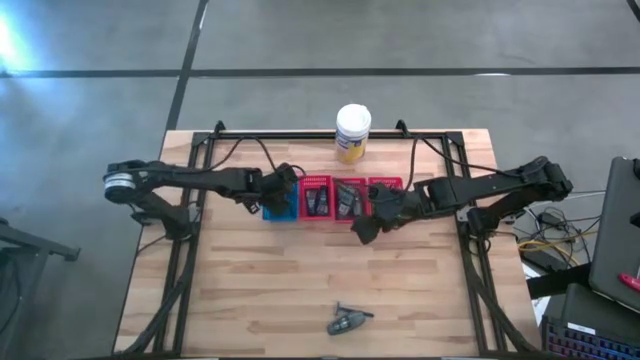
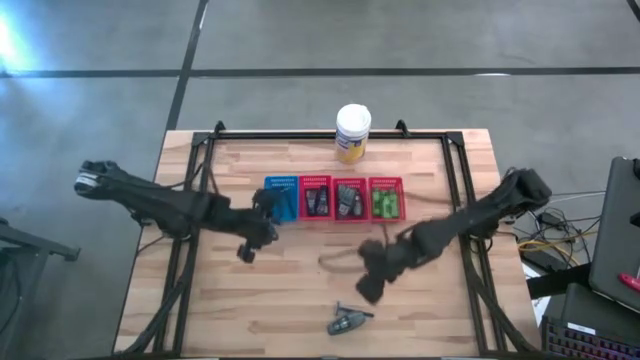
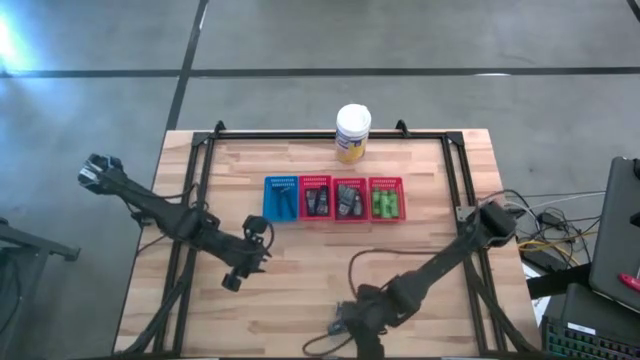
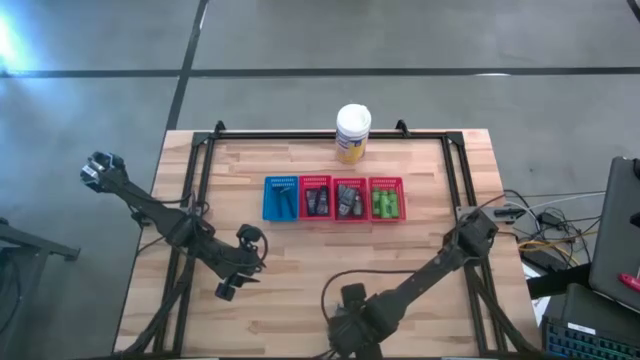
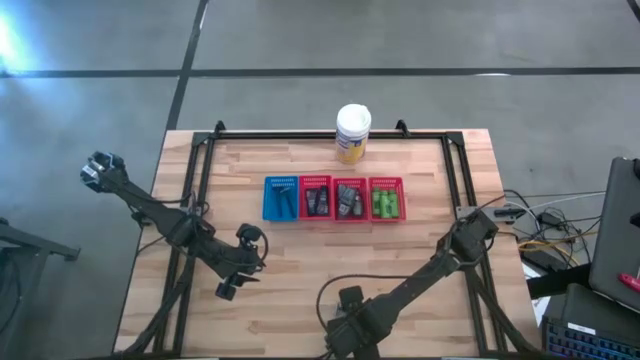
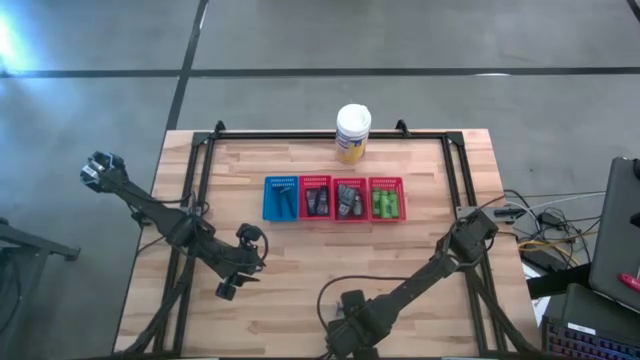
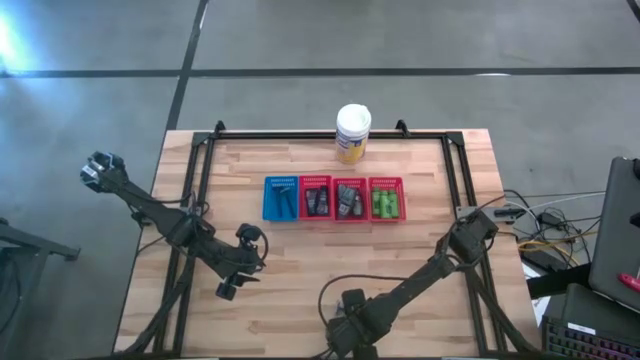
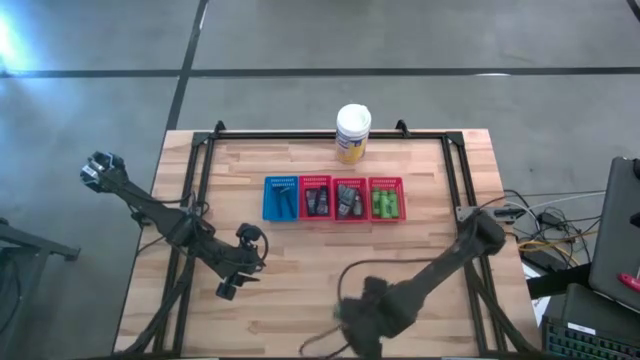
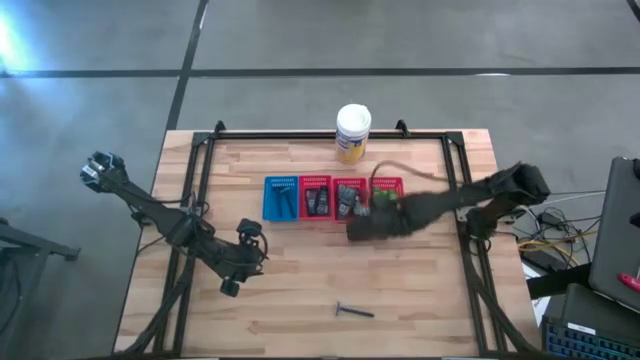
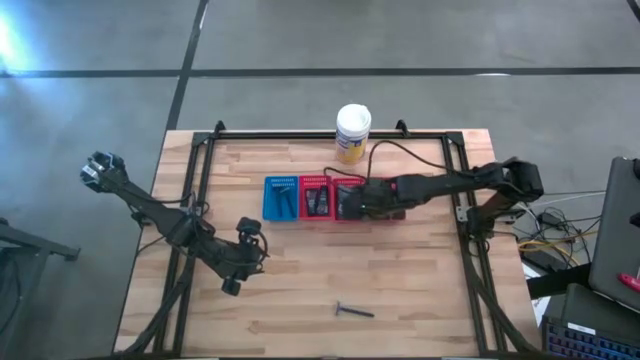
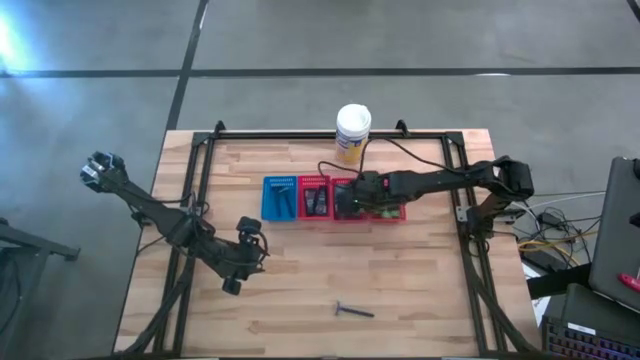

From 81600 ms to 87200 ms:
Task: Pick & Place Travel size toiletries
Put the black deodorant into the middle red bin

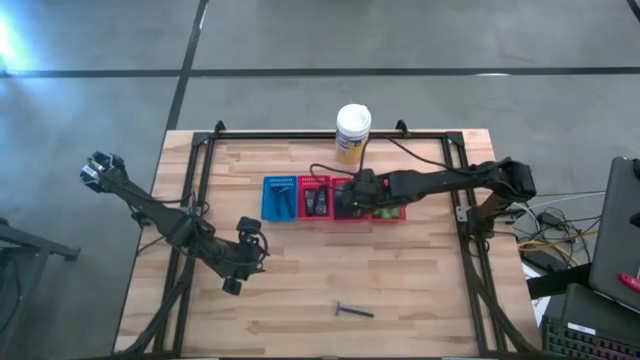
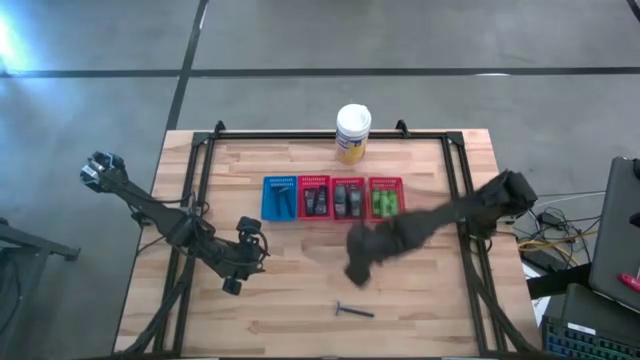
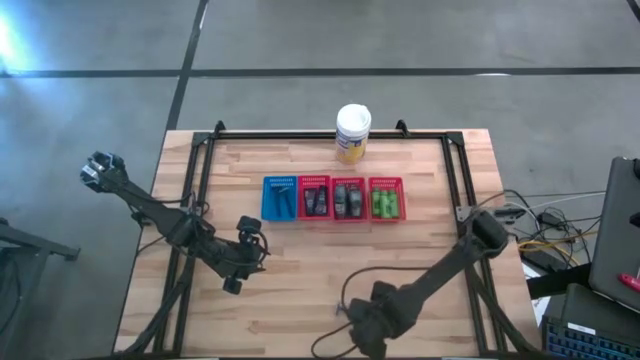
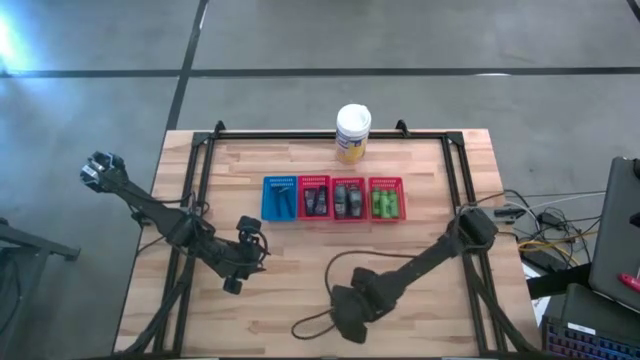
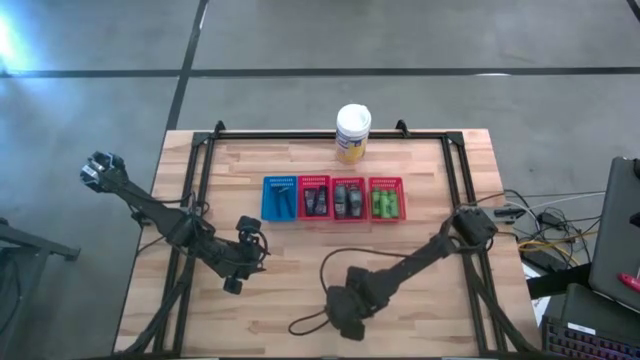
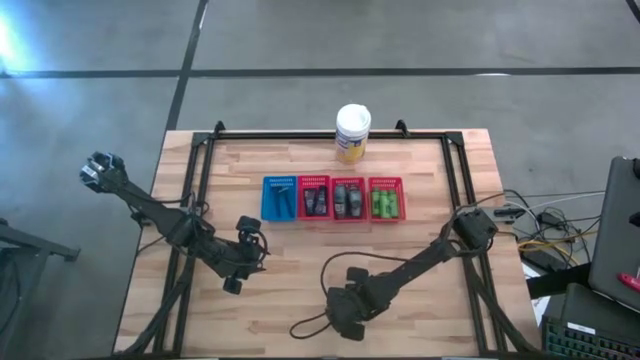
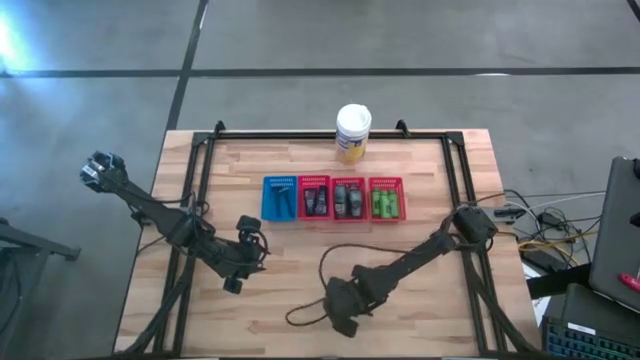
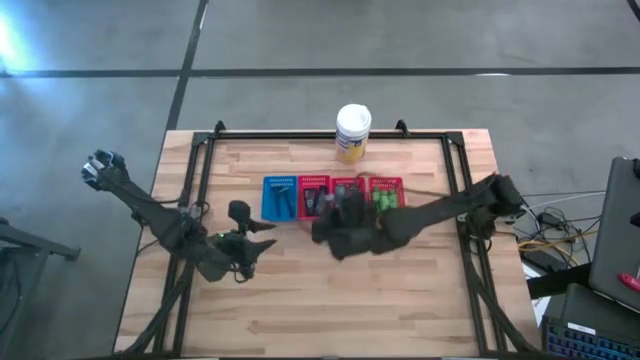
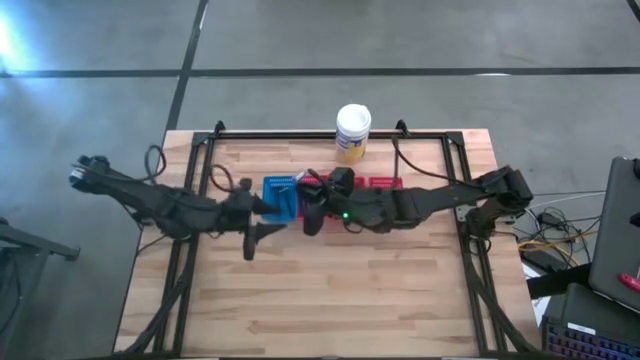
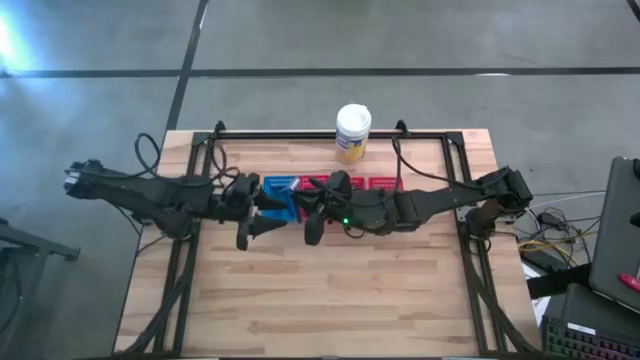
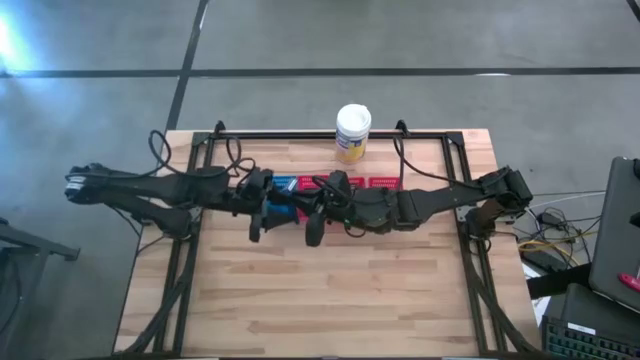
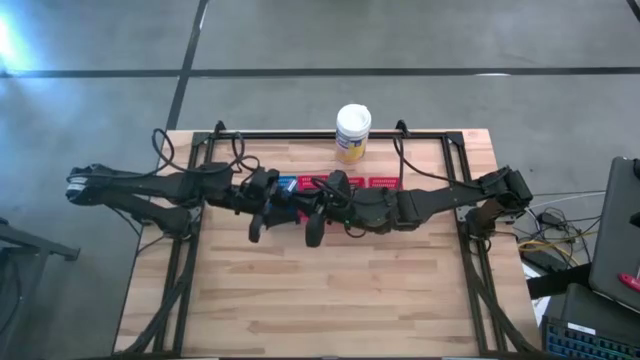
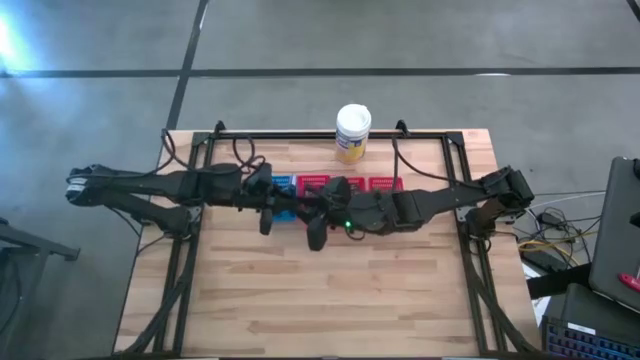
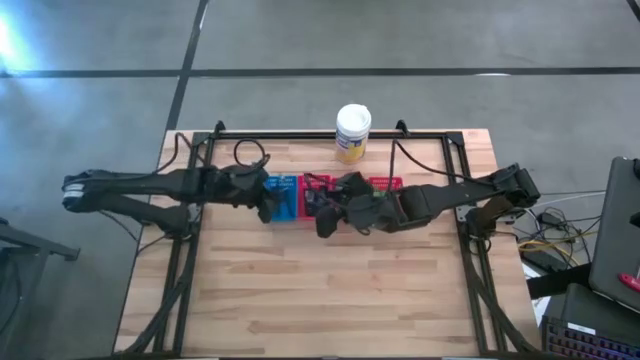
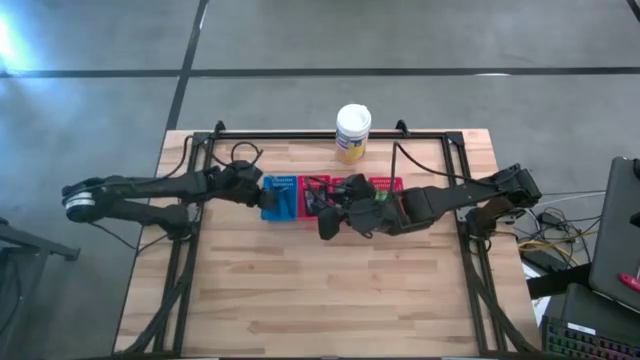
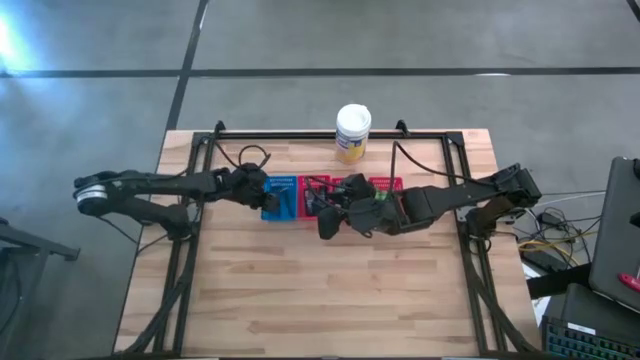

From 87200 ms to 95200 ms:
Put the blue razor into the blue bin

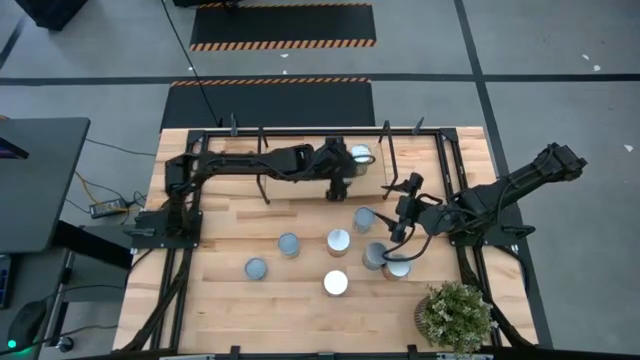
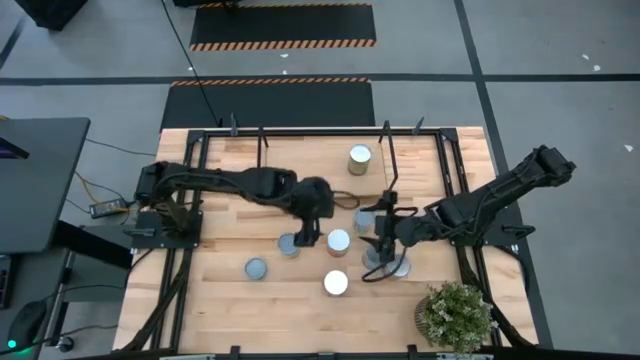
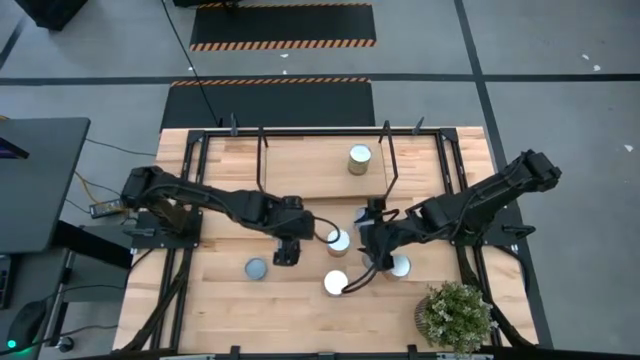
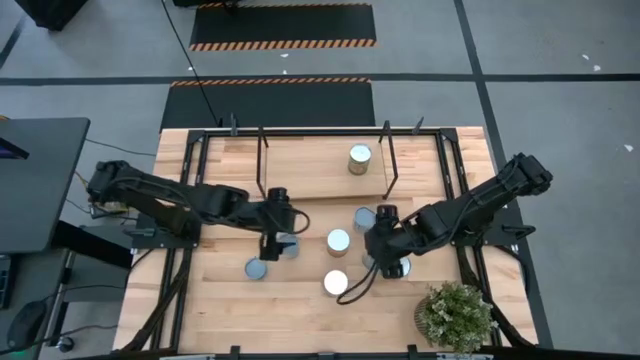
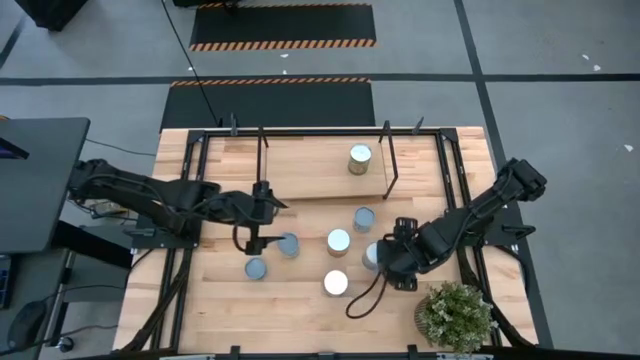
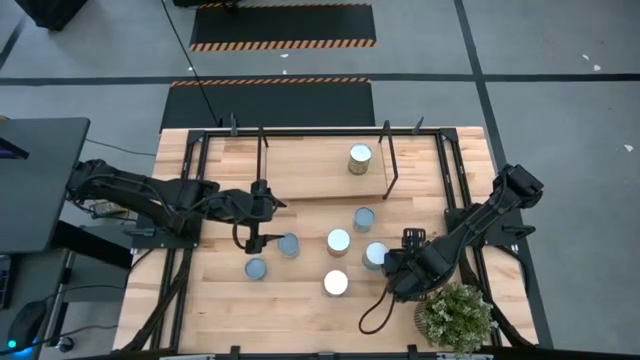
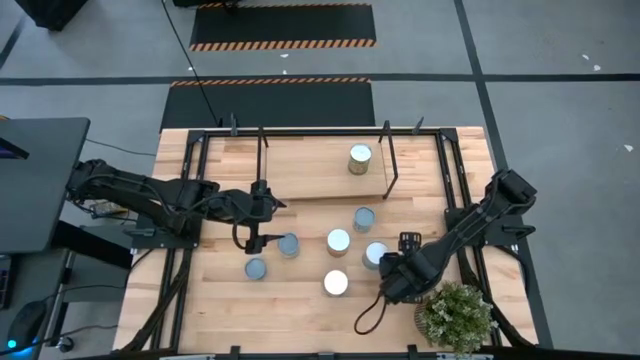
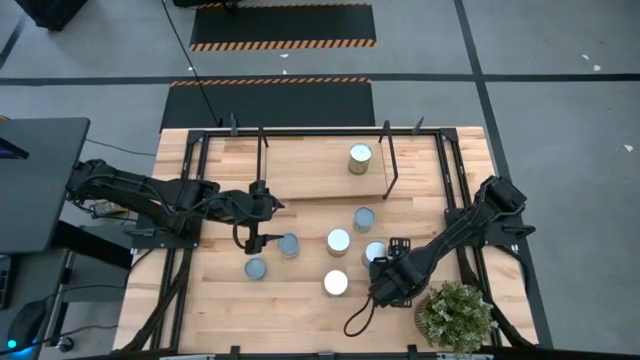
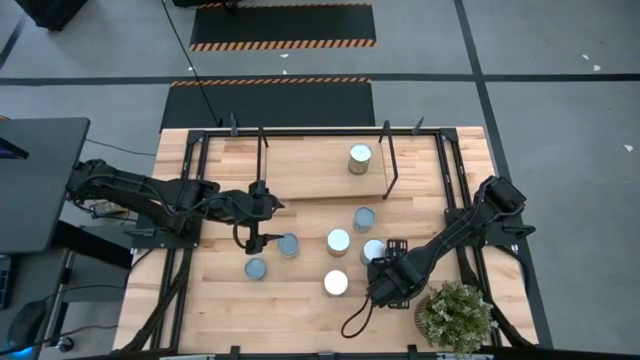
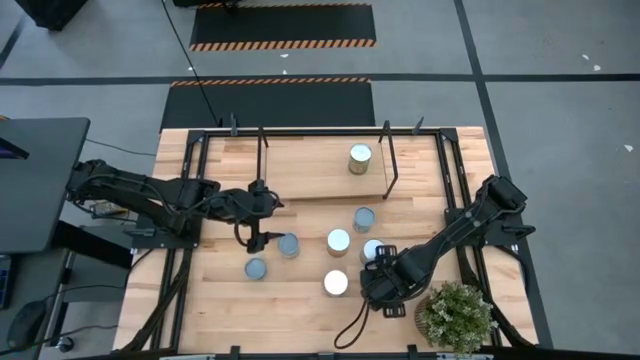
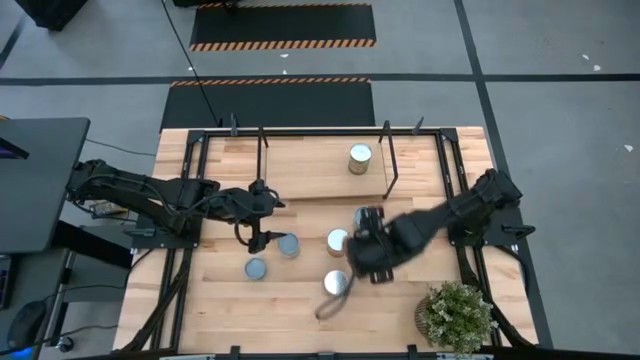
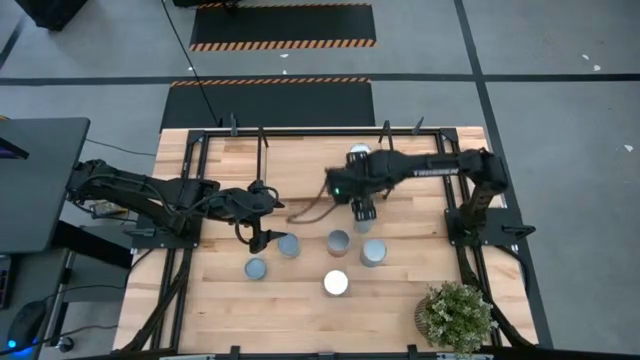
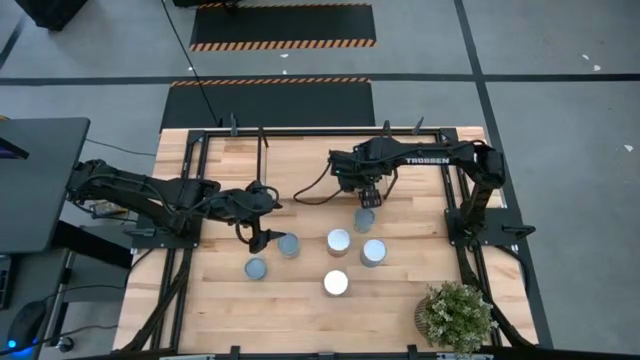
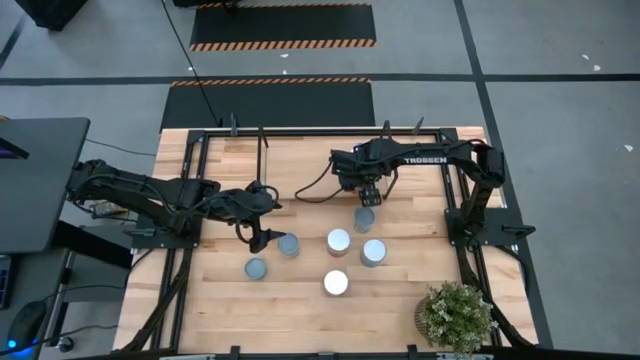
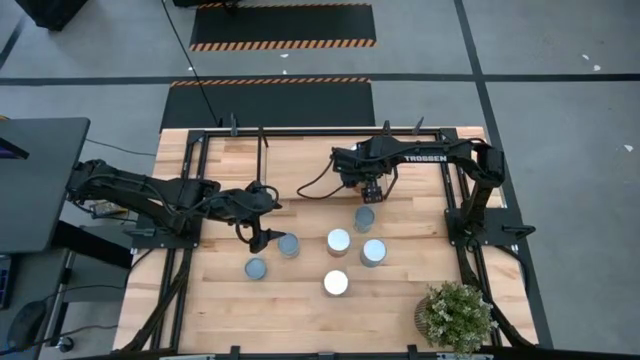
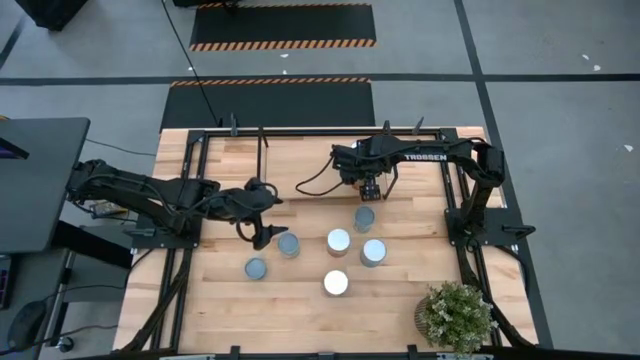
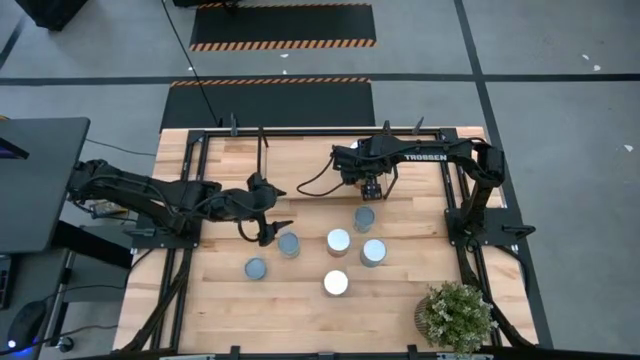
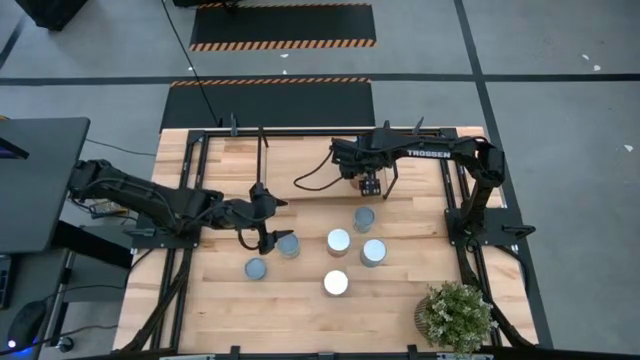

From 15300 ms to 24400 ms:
Task: Pick and place cans onto a shelf
Put the canned pineapples on the shelf
